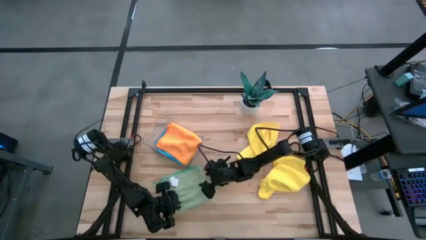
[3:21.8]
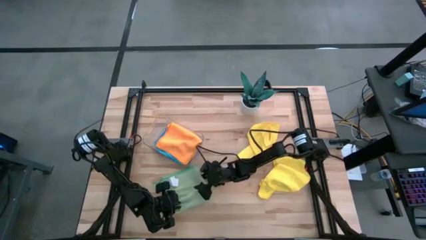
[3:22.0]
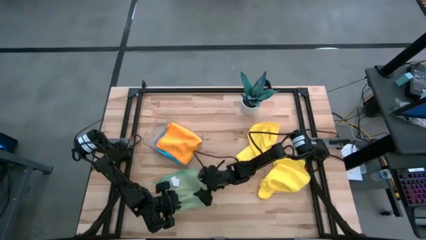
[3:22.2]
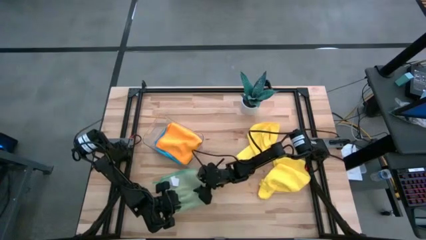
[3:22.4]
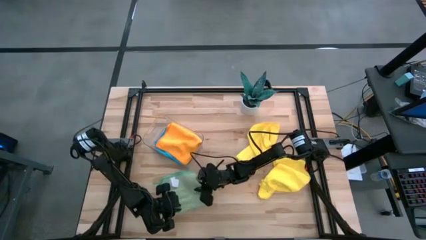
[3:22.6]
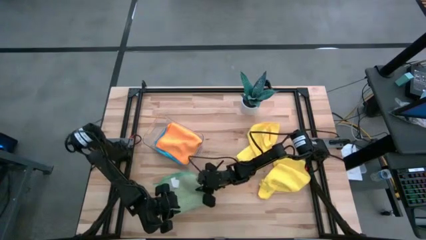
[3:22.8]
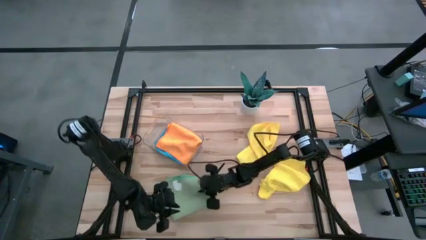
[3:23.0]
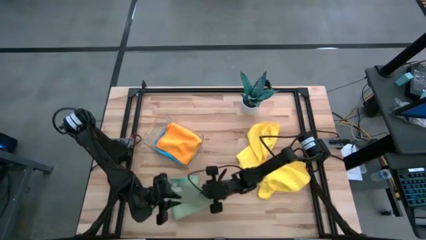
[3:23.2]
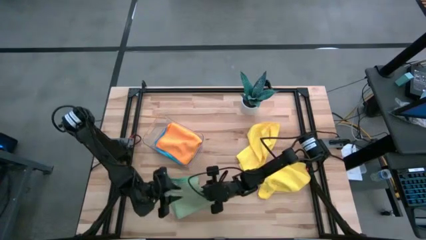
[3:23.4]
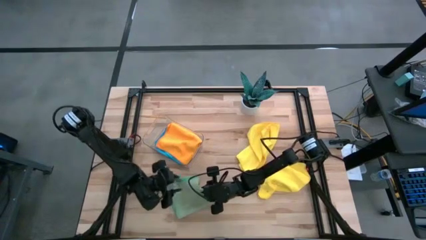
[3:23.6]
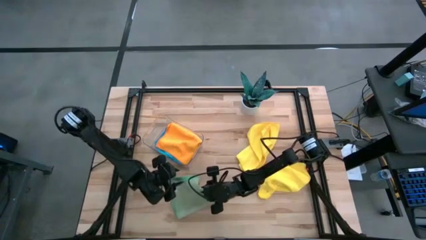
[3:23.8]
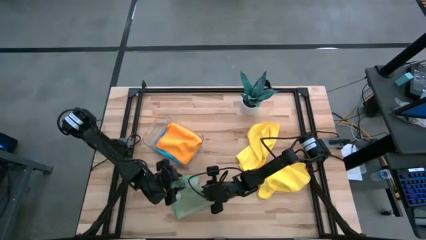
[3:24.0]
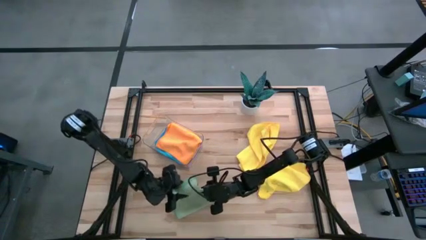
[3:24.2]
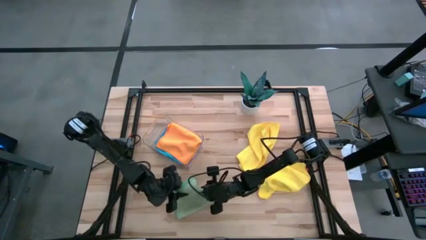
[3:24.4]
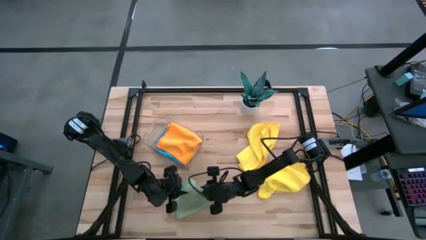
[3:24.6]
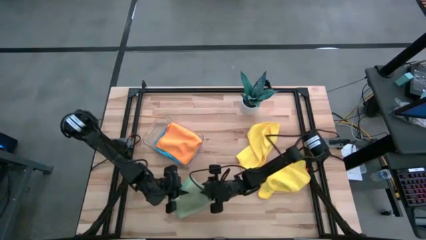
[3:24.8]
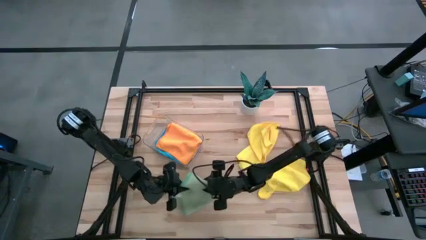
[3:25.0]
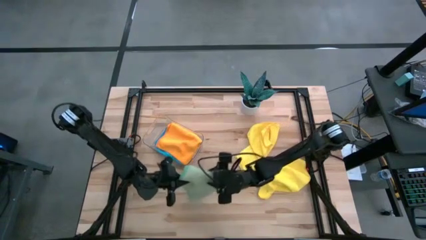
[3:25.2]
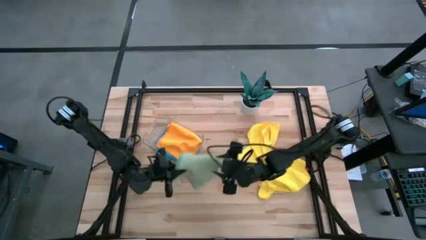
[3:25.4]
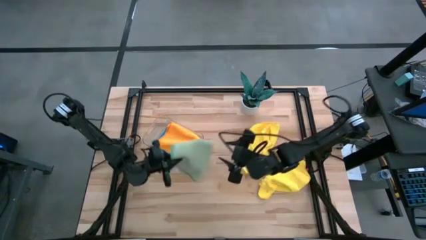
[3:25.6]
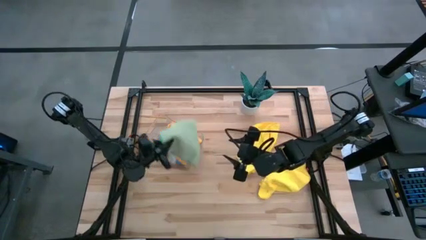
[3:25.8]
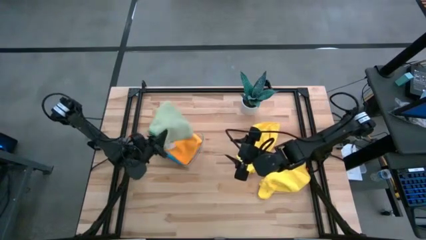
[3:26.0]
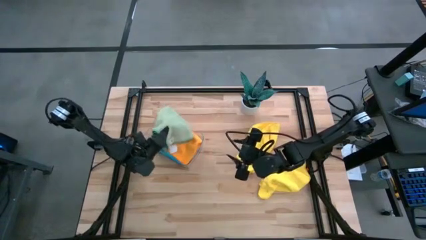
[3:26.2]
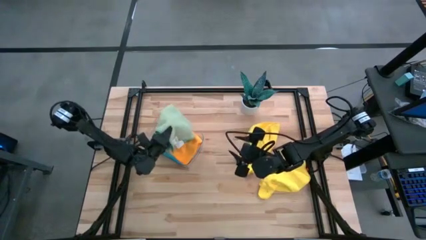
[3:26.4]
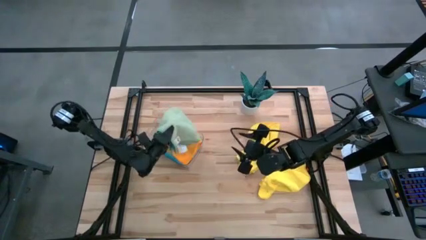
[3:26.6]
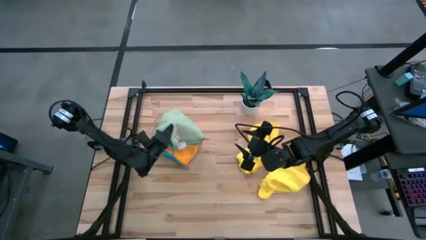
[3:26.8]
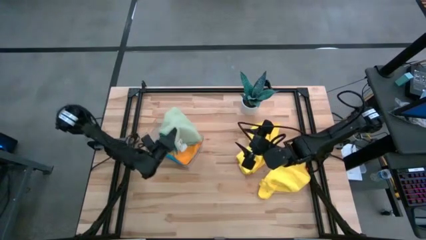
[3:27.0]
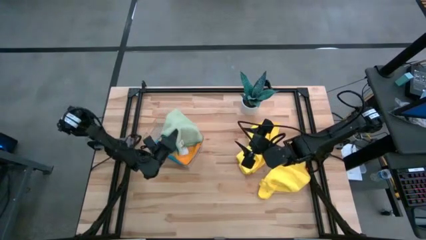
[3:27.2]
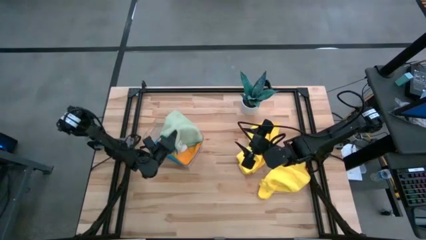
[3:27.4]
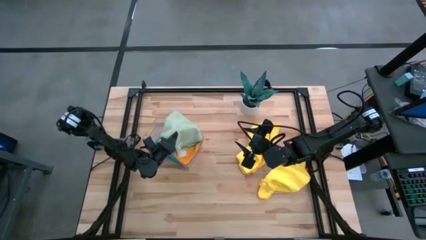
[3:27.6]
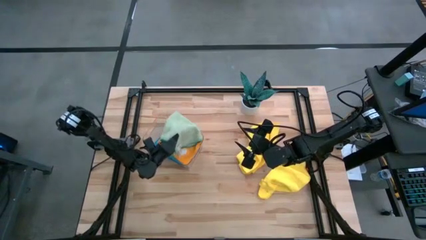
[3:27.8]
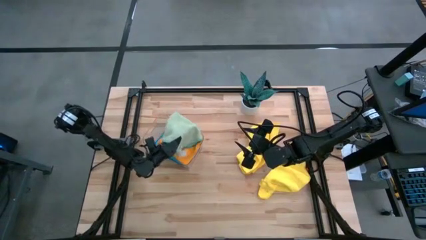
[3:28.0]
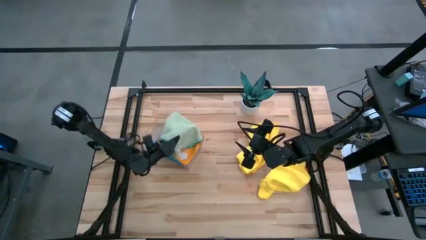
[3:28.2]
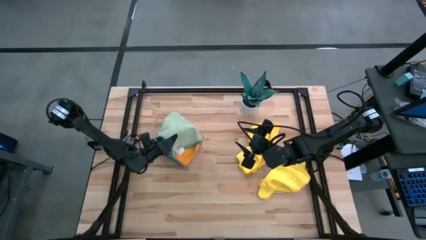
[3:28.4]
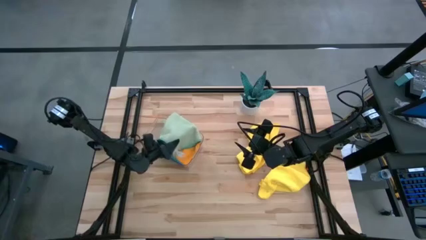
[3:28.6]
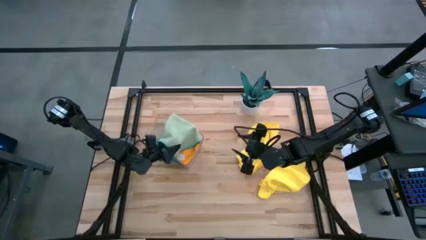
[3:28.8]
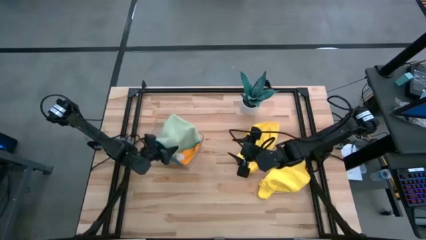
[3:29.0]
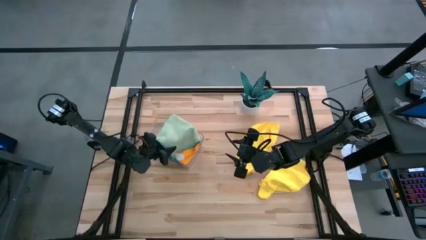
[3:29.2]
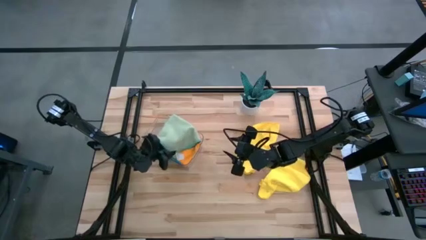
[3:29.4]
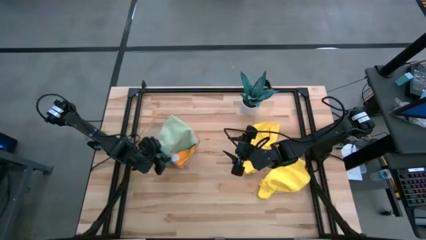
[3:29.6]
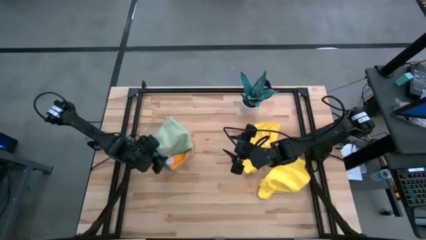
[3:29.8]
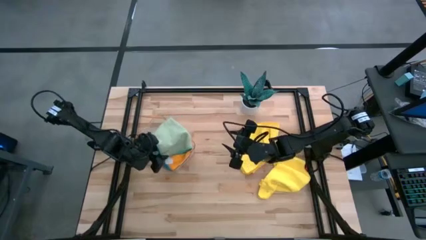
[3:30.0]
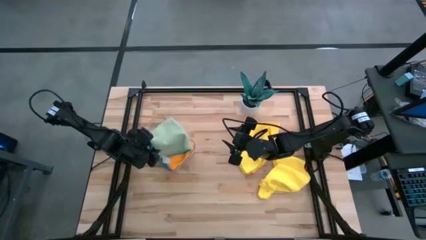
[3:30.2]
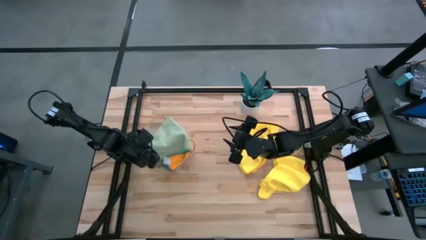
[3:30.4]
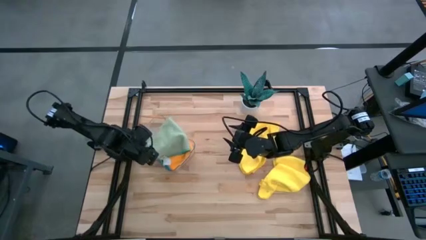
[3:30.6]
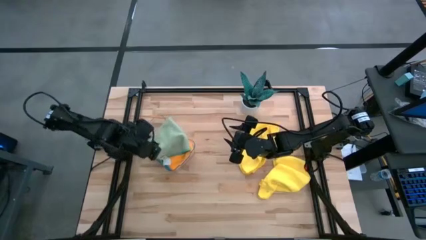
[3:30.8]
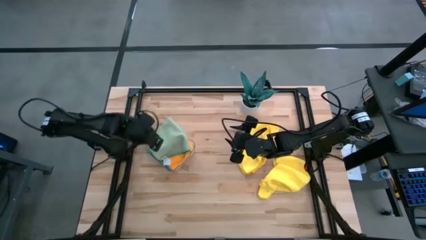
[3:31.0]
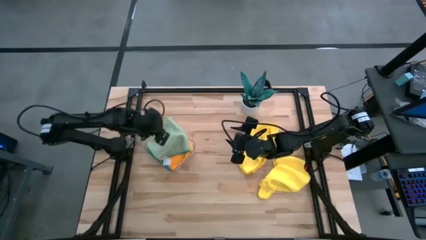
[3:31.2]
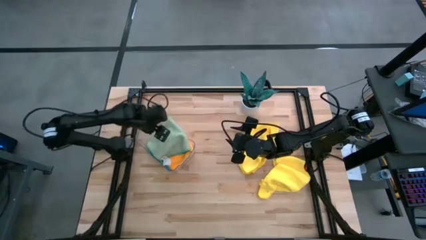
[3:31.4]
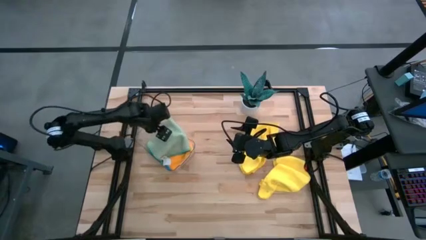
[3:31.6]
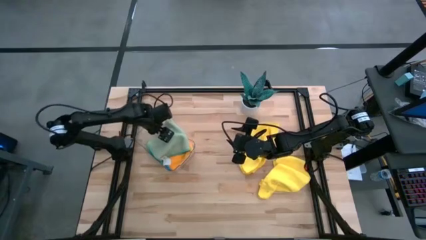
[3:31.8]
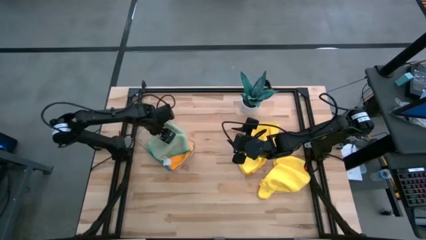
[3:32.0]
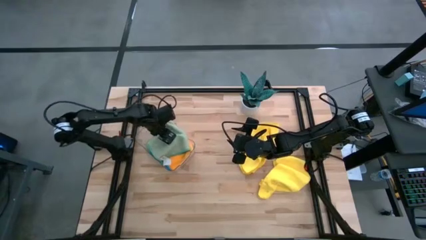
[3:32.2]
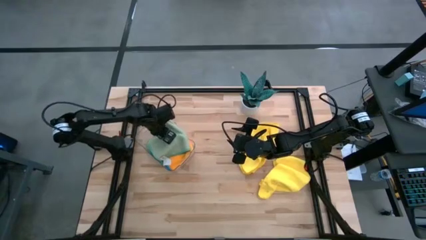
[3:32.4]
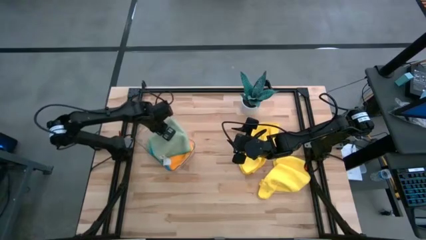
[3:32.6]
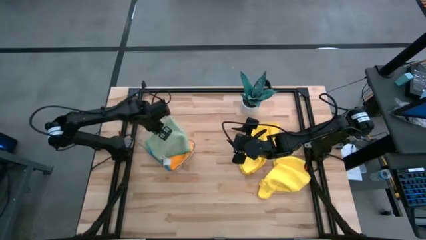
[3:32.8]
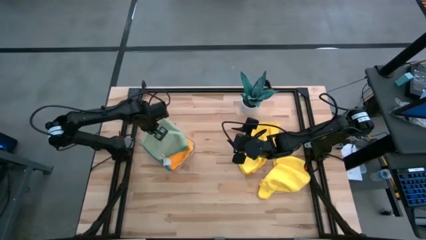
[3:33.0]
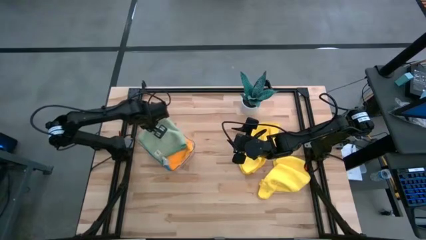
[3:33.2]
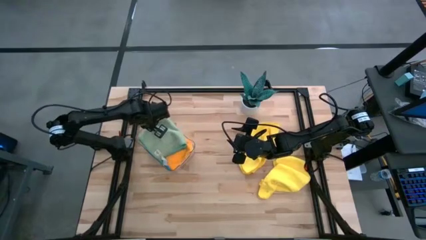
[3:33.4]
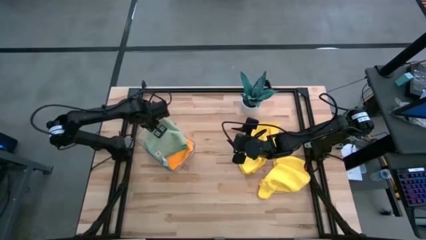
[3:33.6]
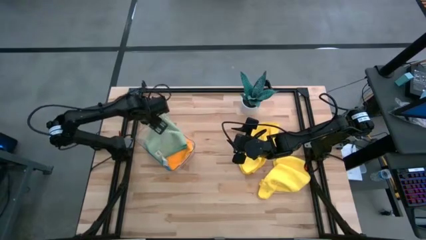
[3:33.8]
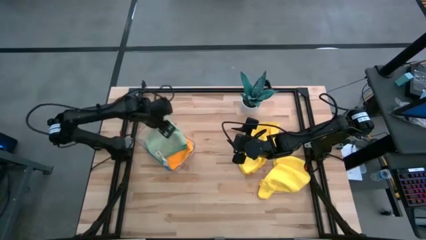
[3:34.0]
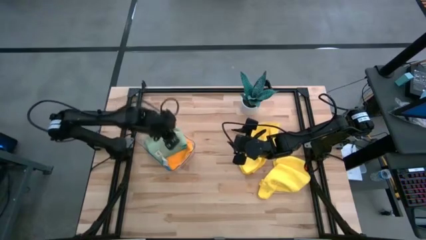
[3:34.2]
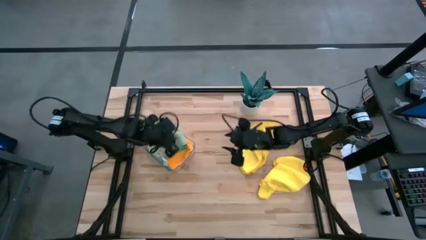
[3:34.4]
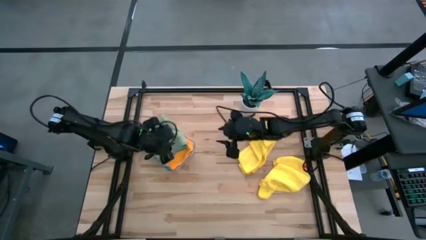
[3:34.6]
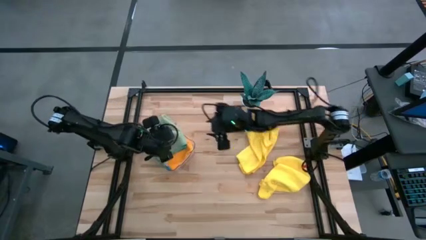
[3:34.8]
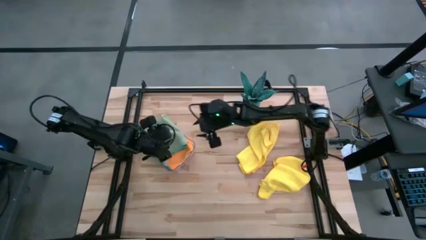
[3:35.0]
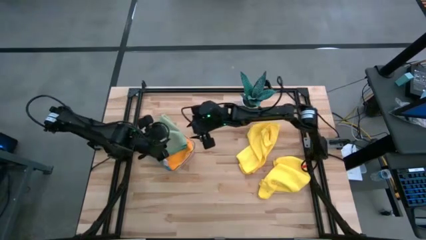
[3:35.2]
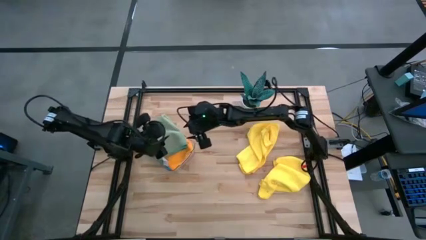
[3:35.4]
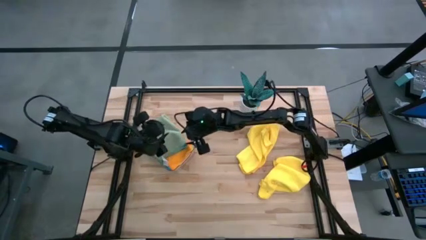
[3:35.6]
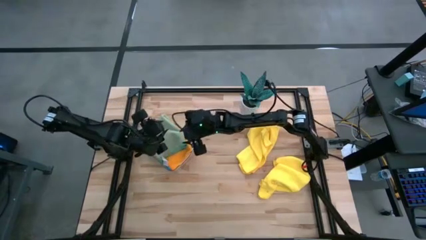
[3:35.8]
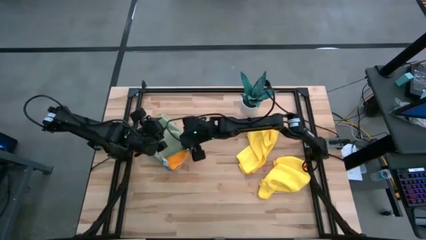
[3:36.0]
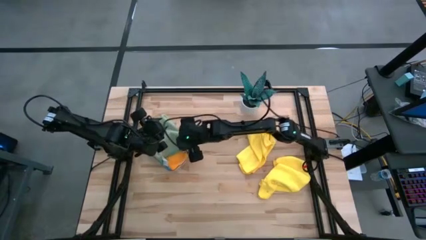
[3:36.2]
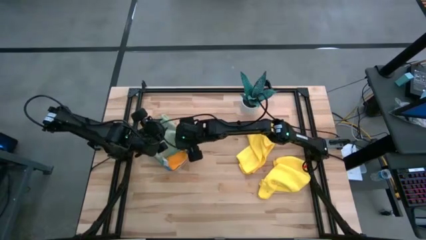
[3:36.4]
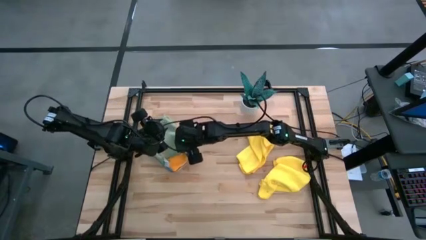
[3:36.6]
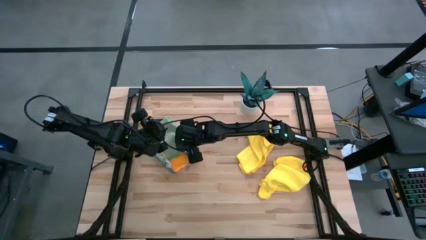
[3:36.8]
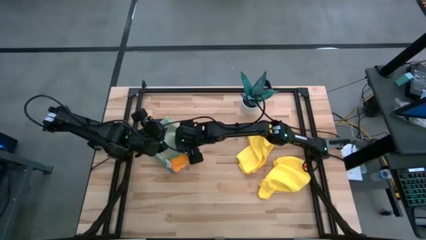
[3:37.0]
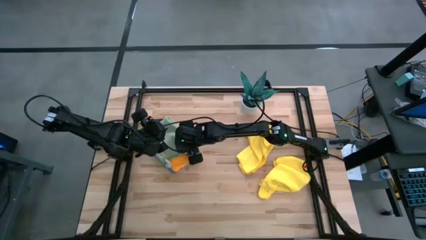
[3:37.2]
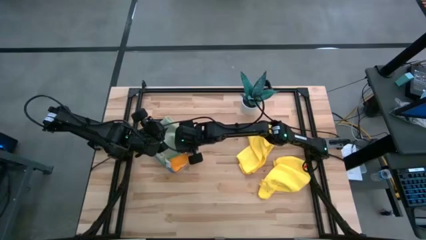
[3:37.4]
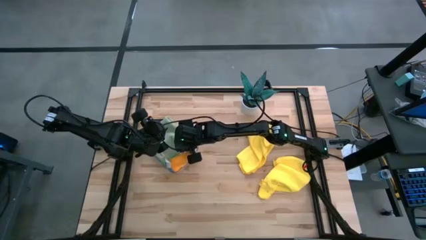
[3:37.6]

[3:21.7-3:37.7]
Task: Fold microfiber towels
Put the green microfiber cloth into the transparent bin
